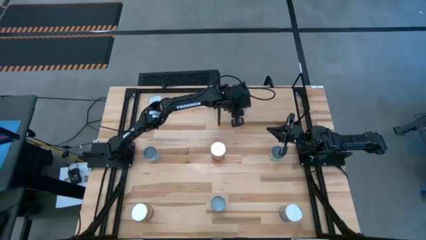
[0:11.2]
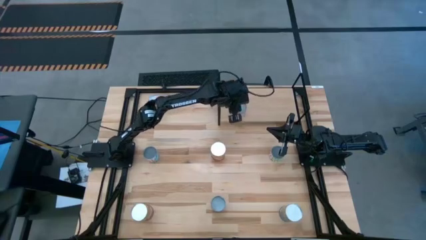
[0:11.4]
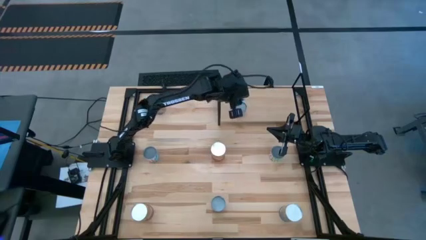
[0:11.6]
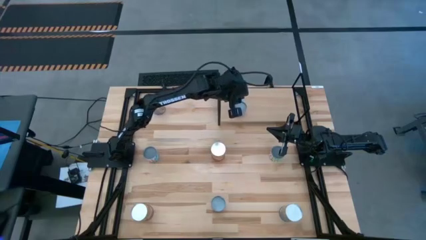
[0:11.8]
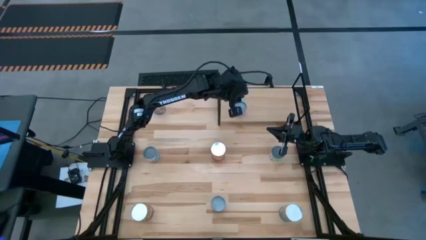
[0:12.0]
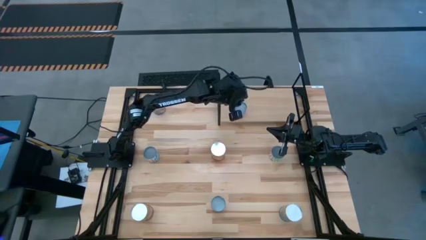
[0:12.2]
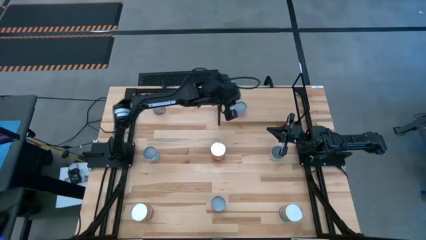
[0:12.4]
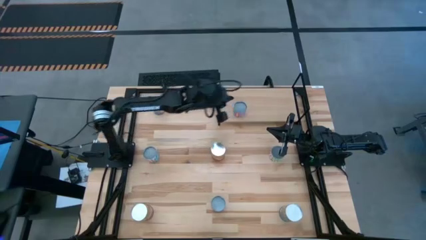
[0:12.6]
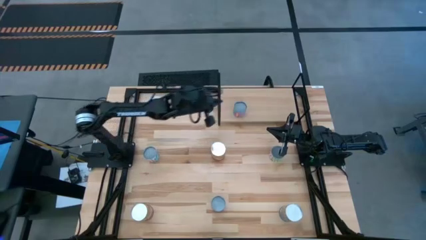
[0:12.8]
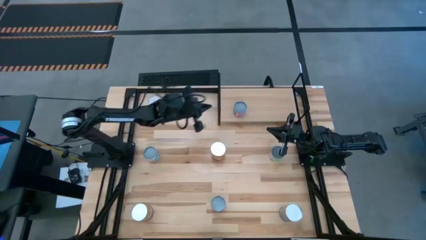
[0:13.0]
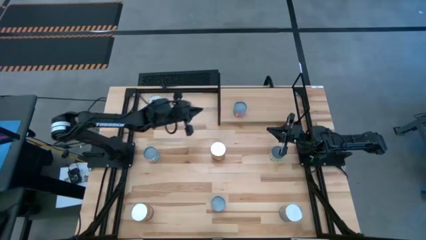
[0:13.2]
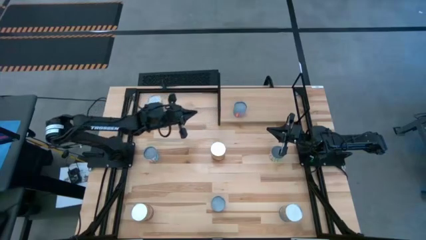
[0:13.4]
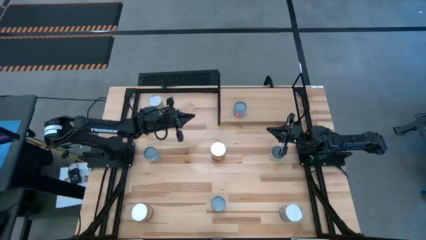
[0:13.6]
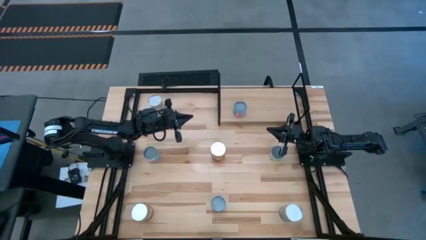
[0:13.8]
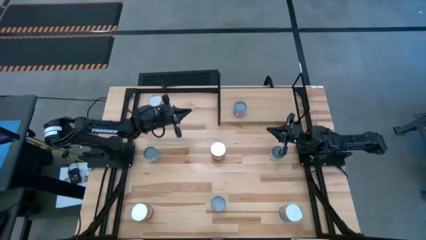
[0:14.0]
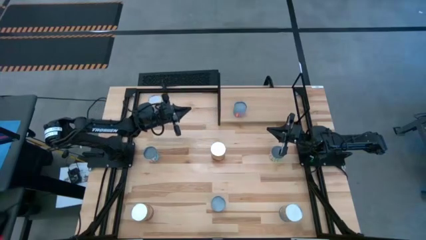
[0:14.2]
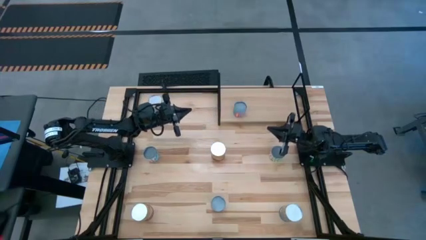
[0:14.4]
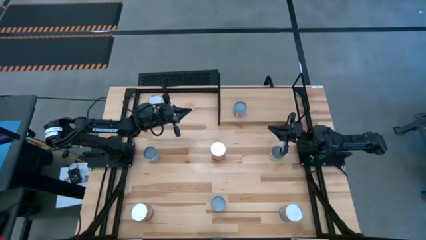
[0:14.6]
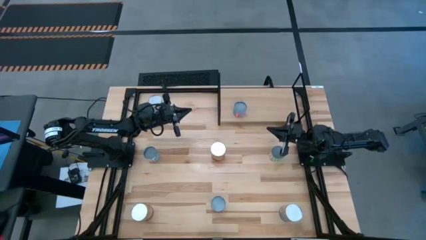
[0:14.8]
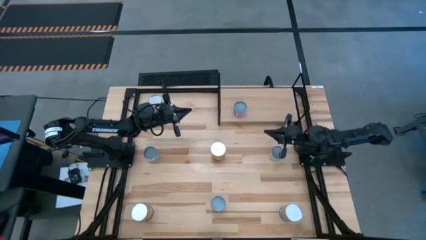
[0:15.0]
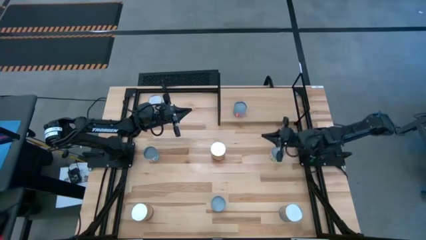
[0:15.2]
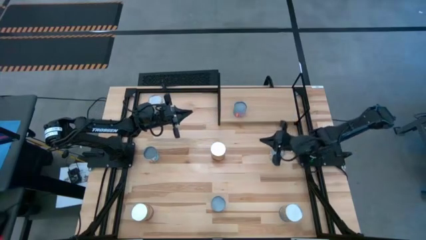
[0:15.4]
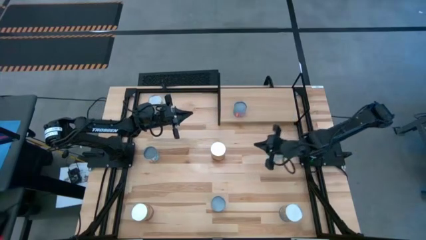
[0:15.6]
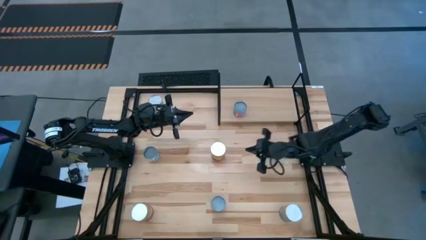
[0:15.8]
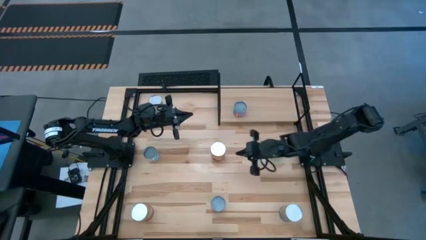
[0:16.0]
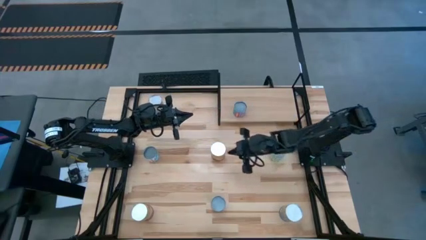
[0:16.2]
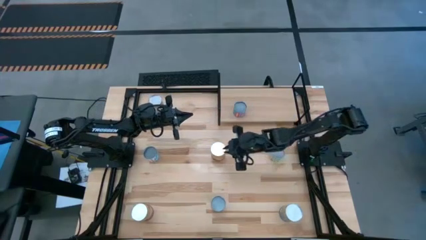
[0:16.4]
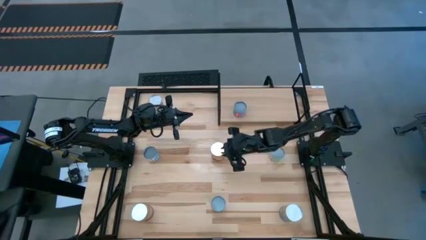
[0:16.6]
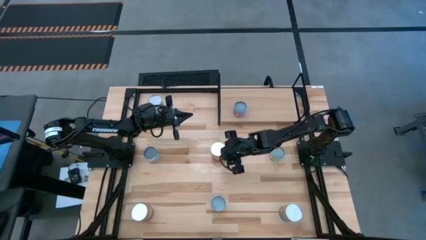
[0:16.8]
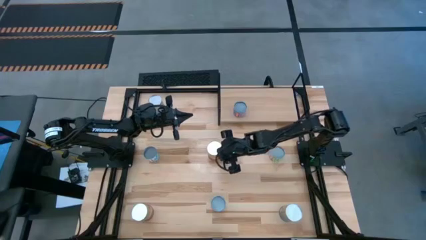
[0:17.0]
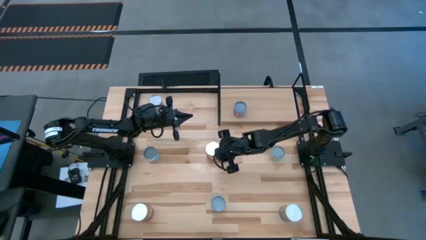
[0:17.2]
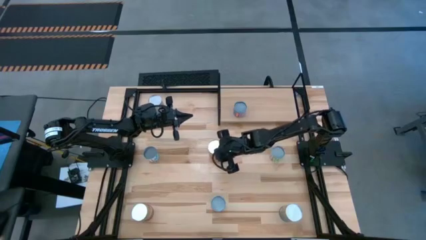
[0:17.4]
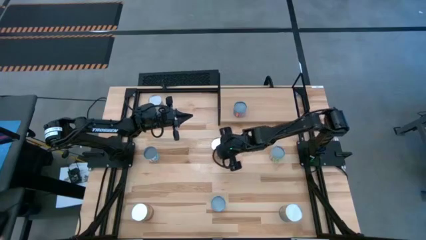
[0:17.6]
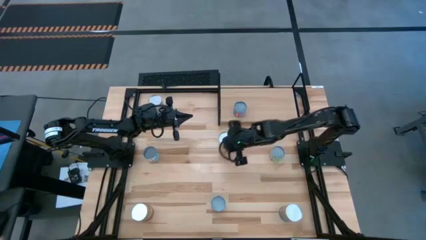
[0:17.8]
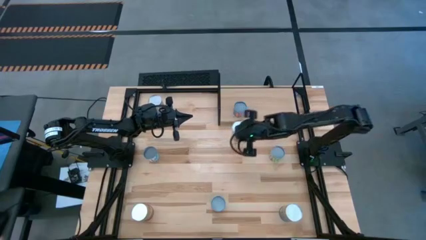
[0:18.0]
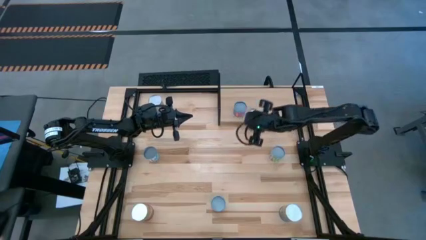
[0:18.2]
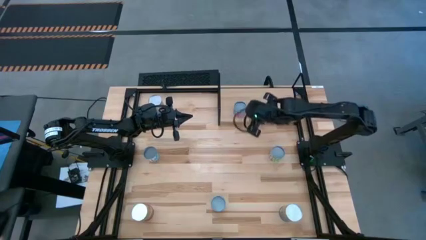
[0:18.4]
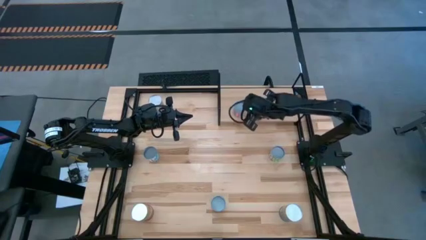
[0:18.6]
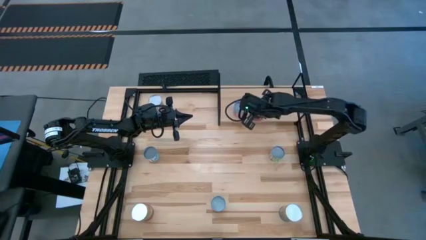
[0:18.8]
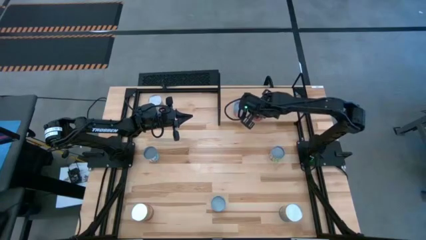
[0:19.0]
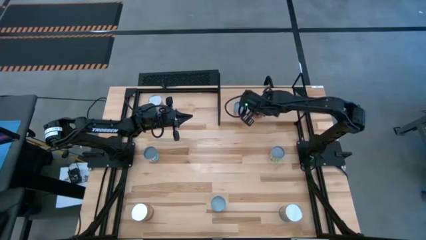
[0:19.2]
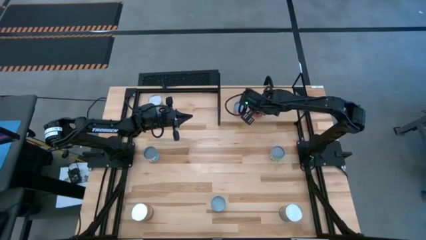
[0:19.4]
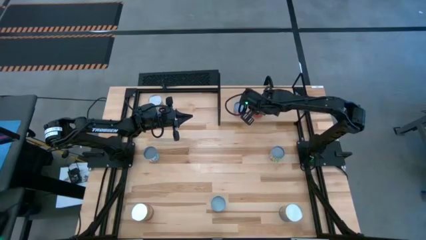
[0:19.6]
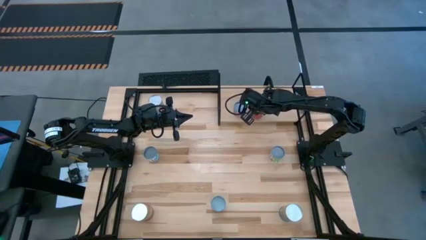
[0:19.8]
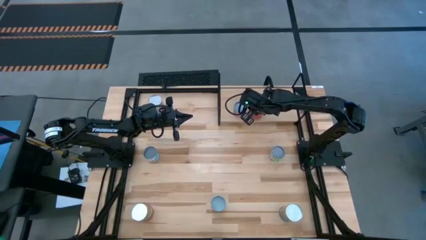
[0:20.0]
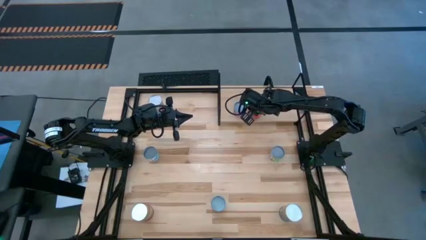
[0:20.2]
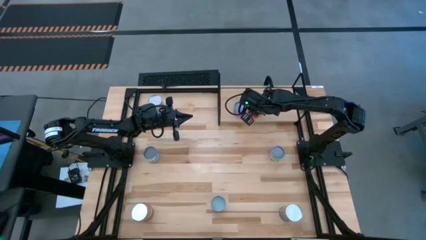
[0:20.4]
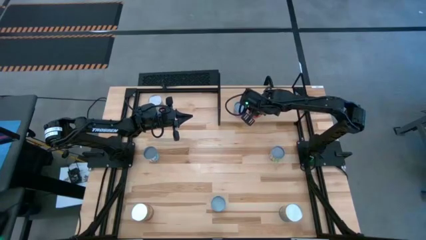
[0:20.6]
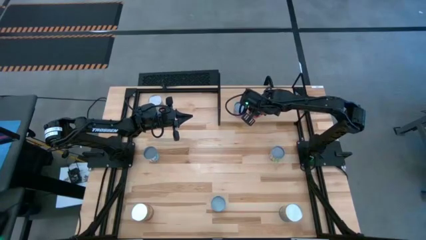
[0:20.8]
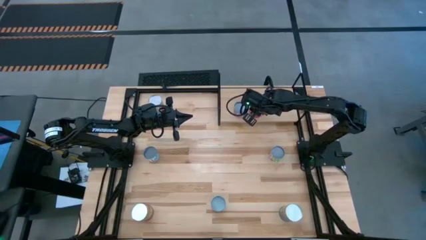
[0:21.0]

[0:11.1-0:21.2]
Task: Pick and place cans onto a shelf
Put the top large canned corn on the shelf

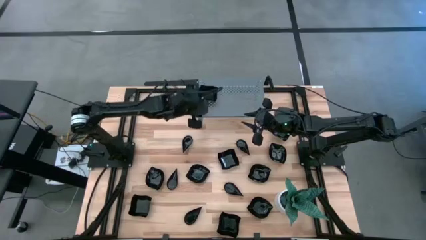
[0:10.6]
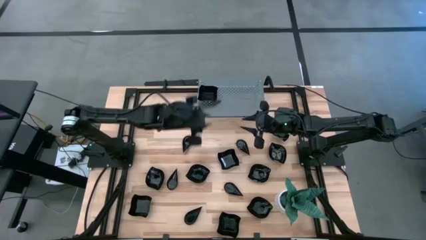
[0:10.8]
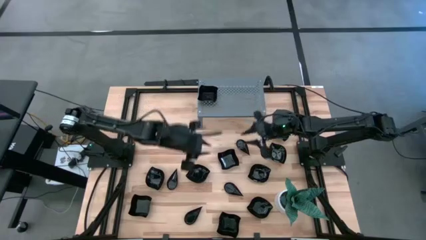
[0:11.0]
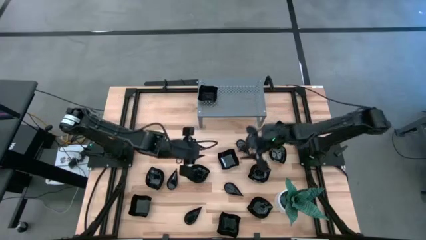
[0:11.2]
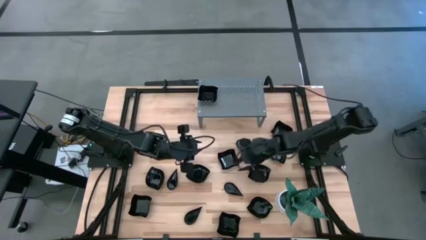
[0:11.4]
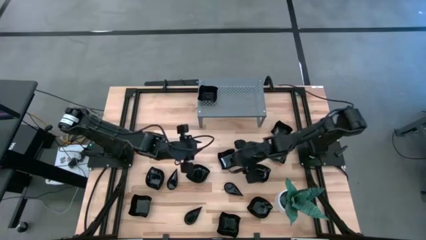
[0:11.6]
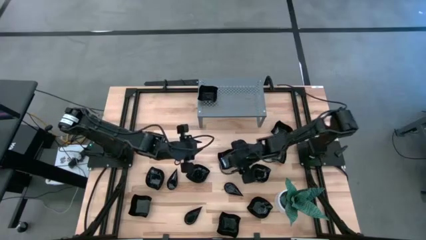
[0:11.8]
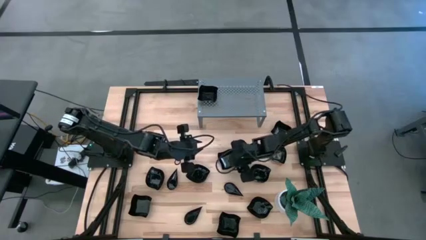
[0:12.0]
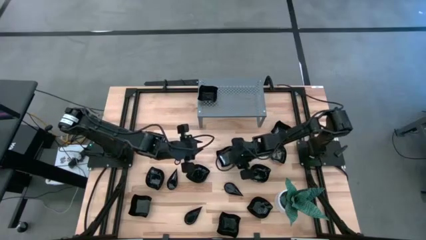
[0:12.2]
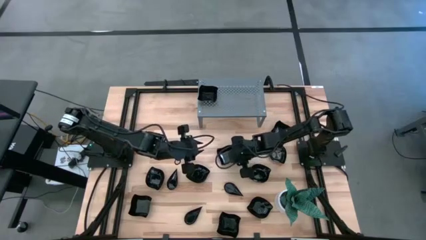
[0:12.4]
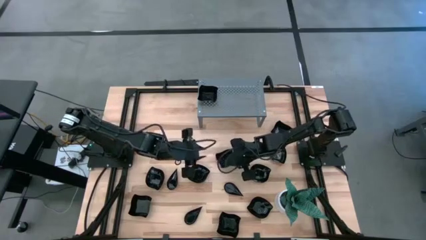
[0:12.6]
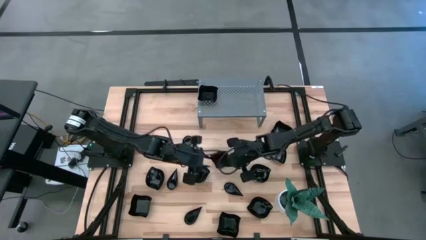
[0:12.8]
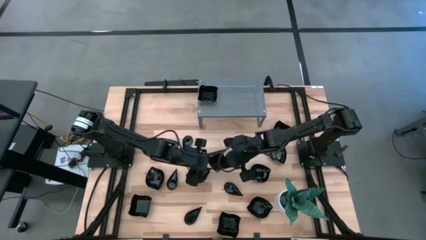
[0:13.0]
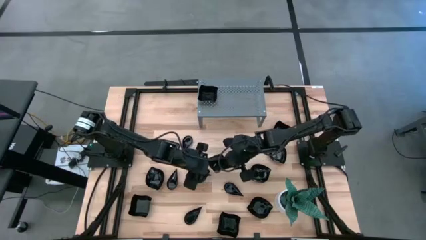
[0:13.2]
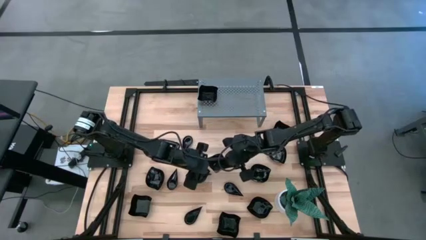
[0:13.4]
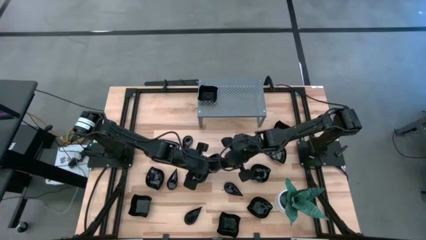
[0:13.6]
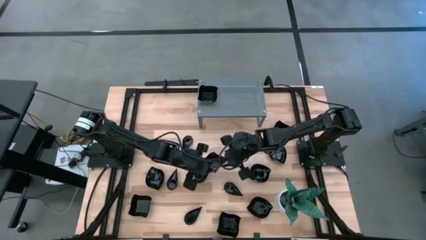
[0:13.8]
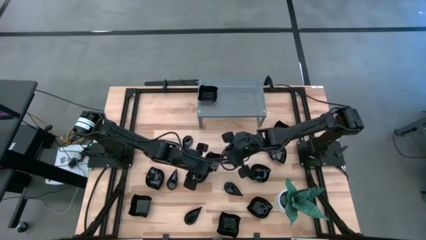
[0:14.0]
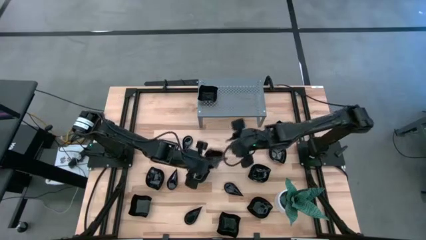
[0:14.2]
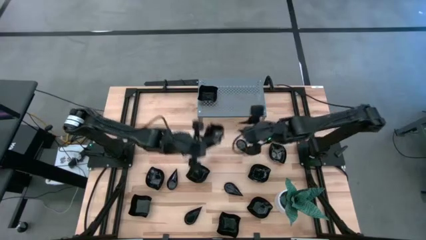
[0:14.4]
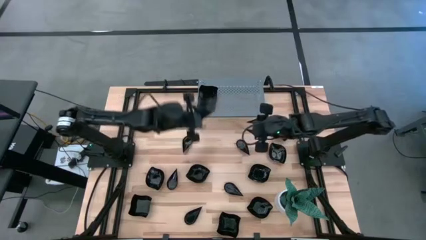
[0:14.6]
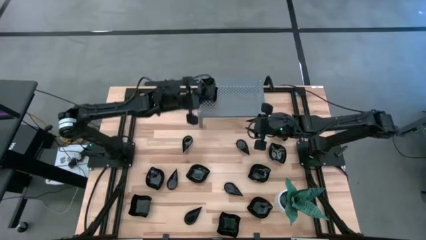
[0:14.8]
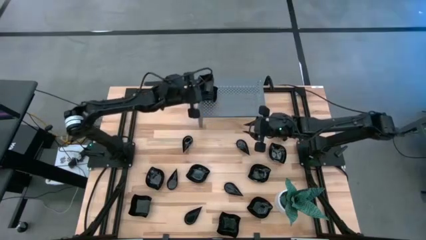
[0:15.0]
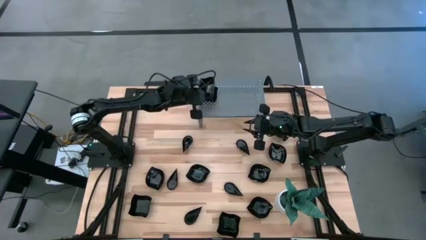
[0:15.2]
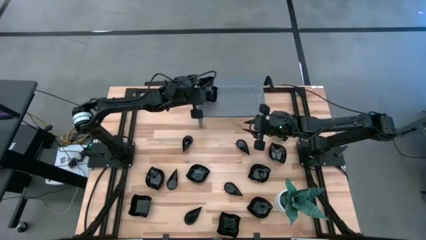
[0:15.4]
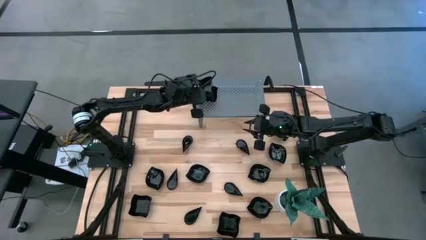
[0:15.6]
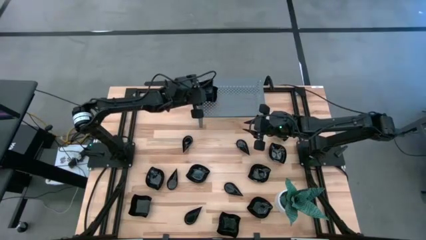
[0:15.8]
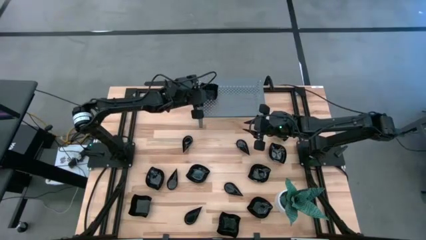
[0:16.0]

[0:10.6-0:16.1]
Task: Pick & Place Mini shaped plates
Stack the distorted square plate on top of the distorted square plate on the shelf
